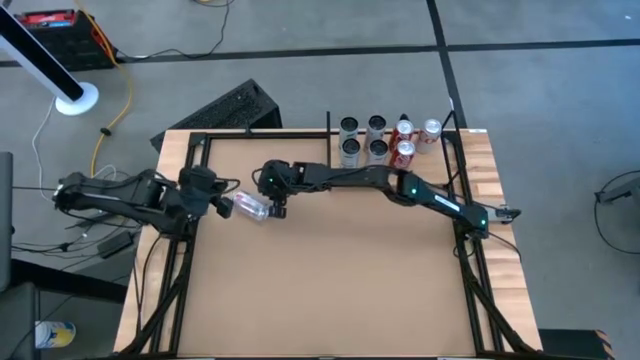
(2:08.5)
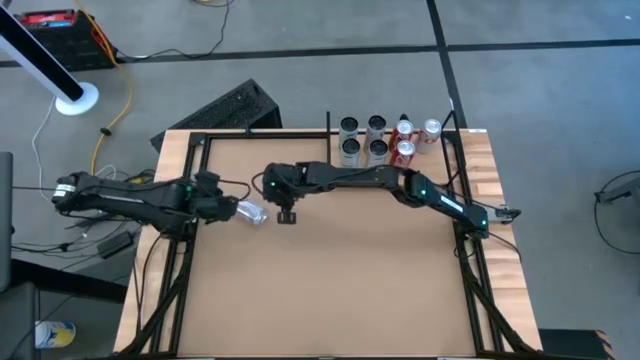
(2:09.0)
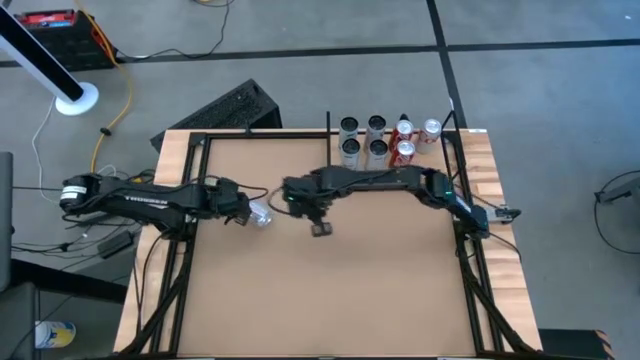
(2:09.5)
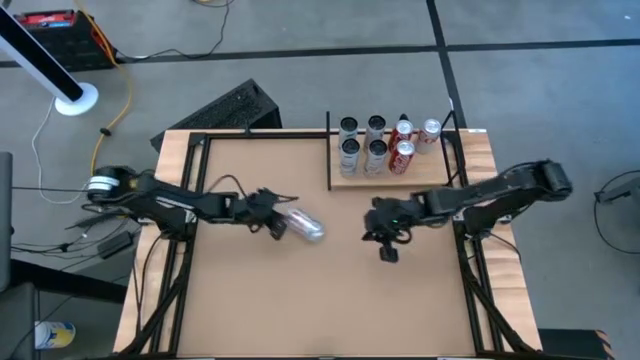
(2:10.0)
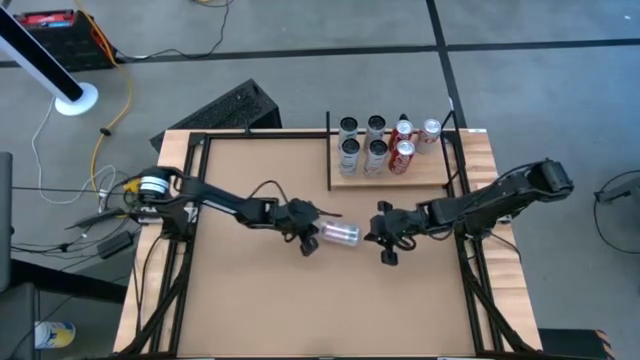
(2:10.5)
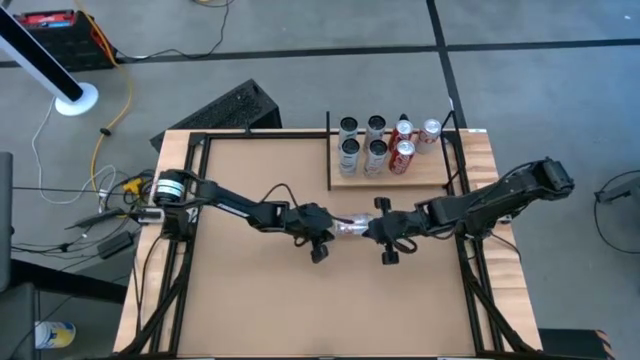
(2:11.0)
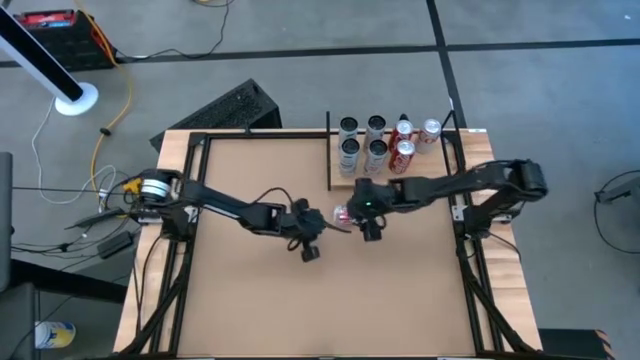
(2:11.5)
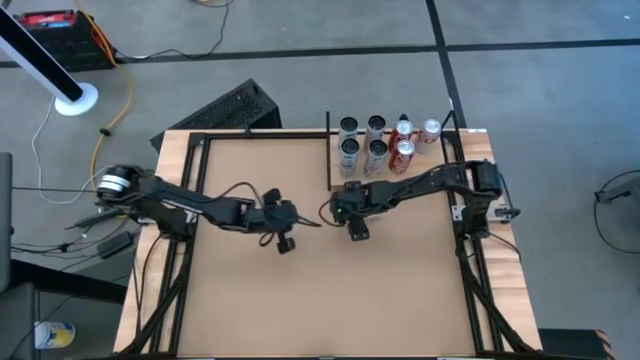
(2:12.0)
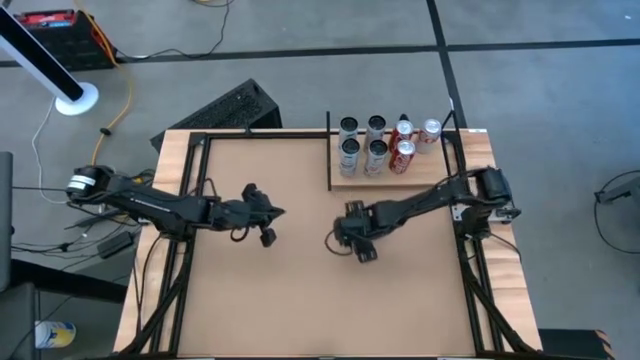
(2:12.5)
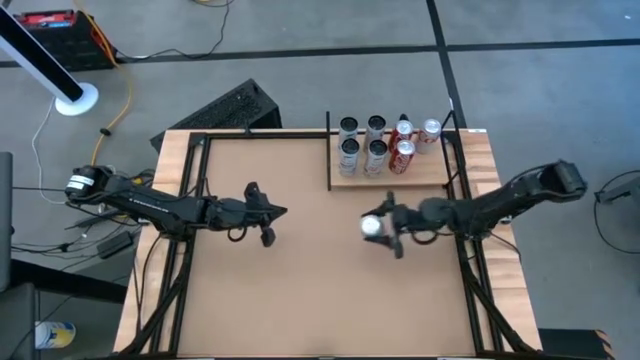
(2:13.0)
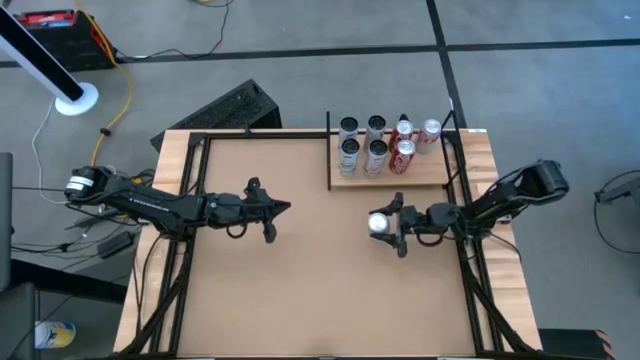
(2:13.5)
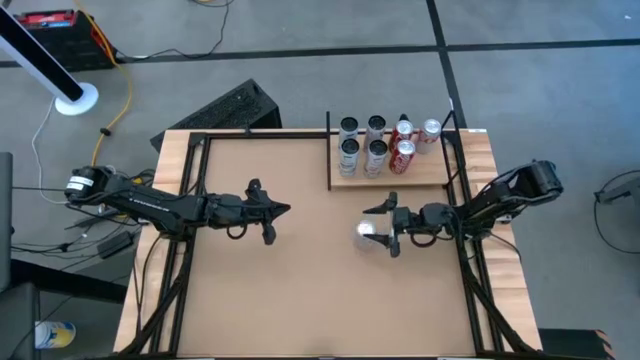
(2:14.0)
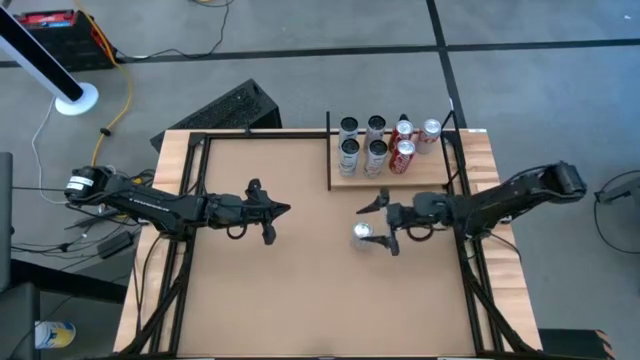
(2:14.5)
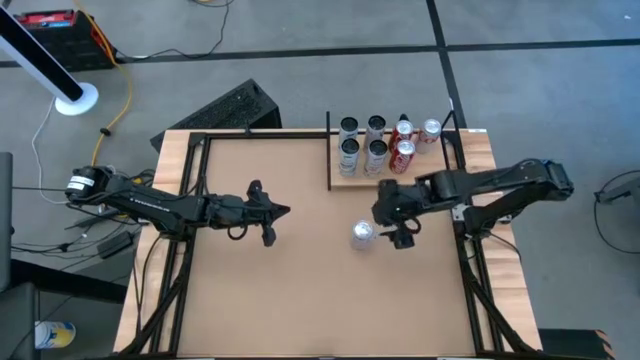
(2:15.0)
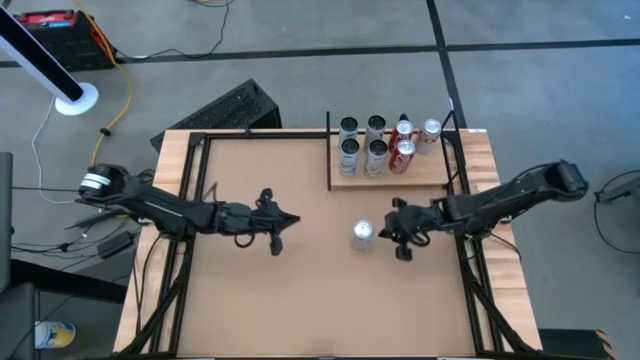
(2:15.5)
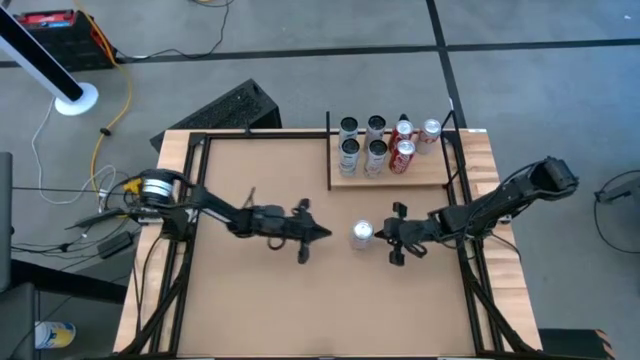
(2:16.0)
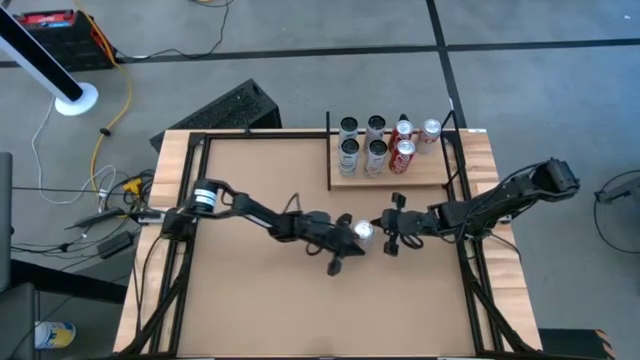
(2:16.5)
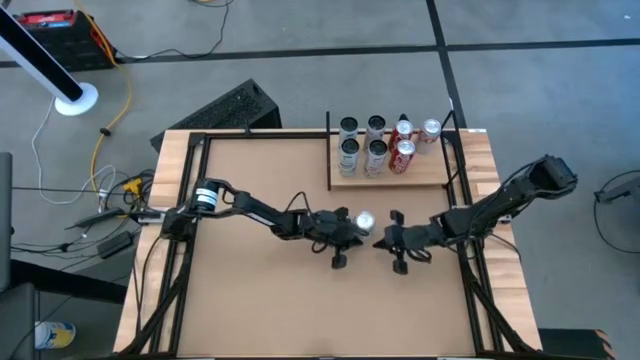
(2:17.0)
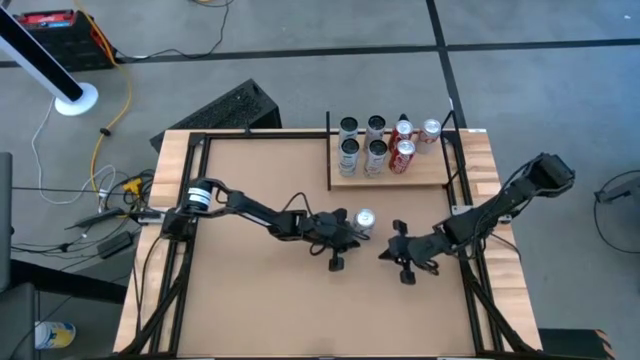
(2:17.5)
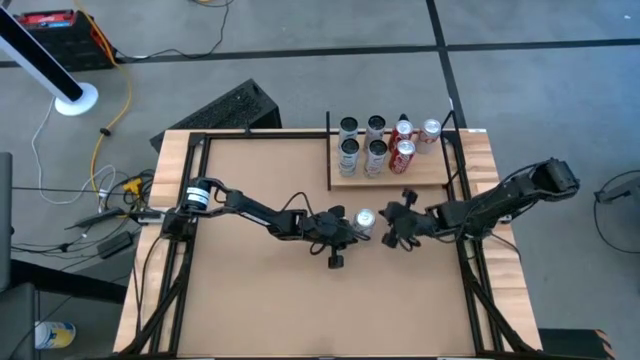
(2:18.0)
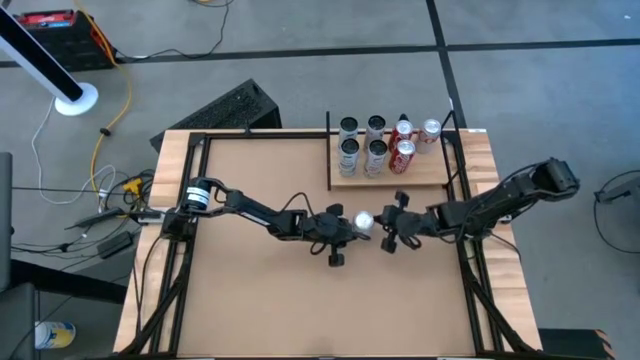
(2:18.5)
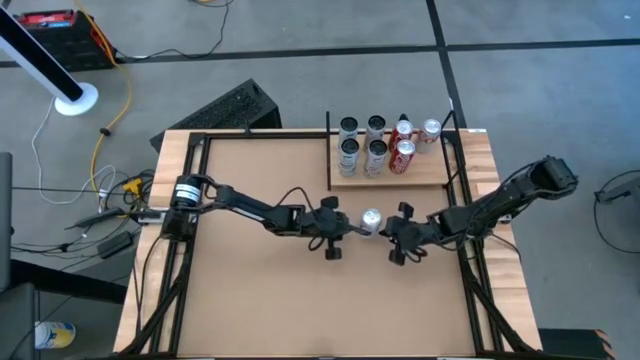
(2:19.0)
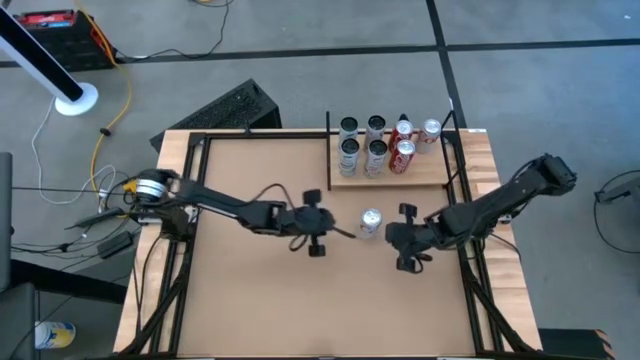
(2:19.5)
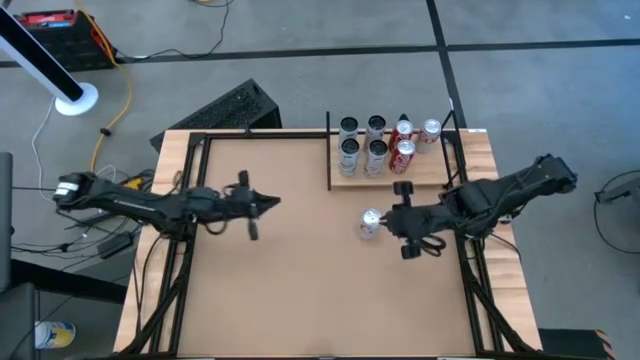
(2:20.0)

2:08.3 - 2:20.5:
Task: Place canned beverage on shelf
Put the silver and red soda can on the shelf

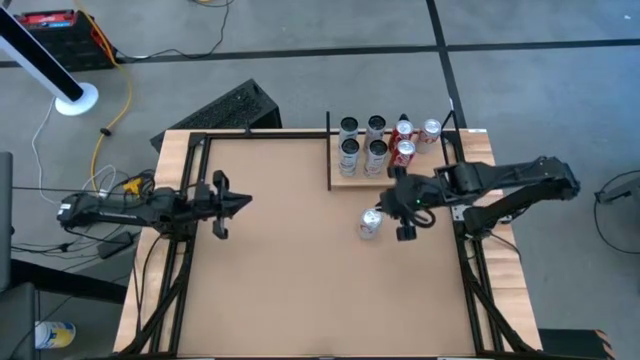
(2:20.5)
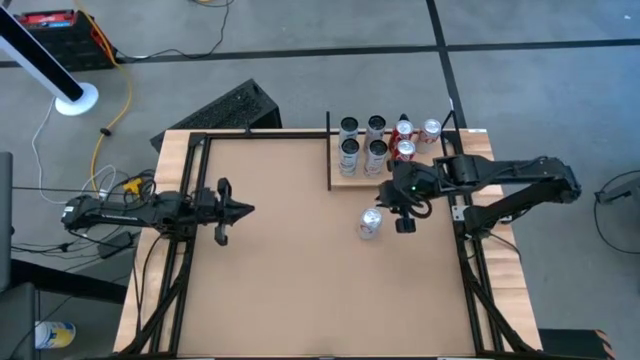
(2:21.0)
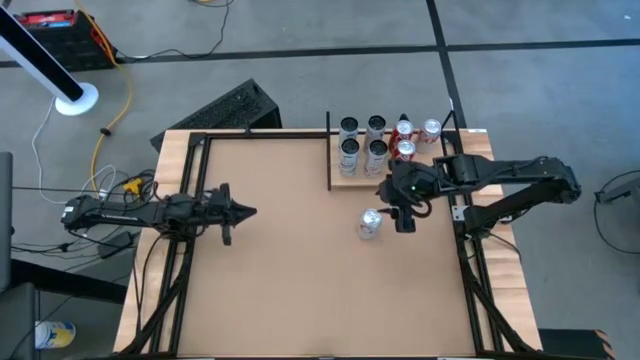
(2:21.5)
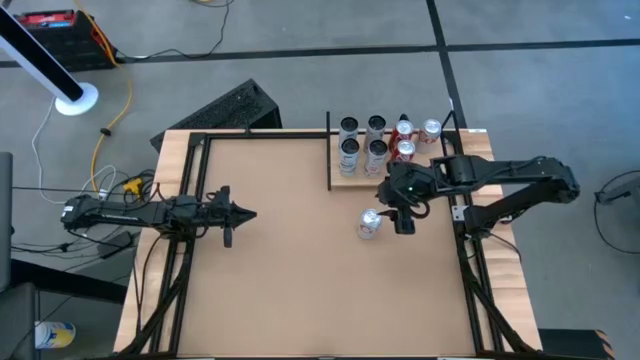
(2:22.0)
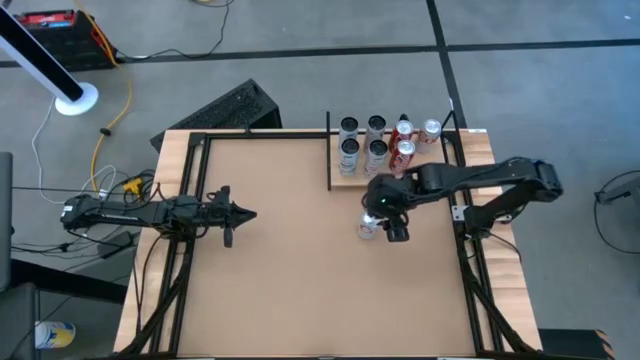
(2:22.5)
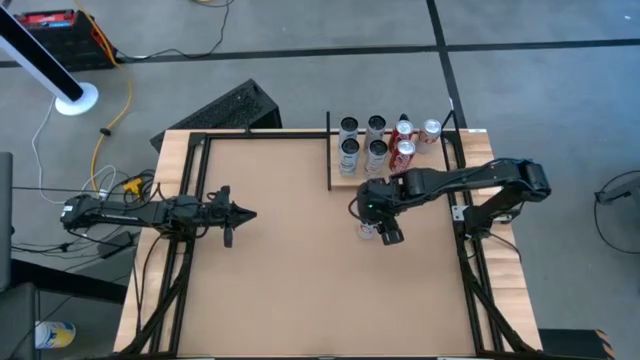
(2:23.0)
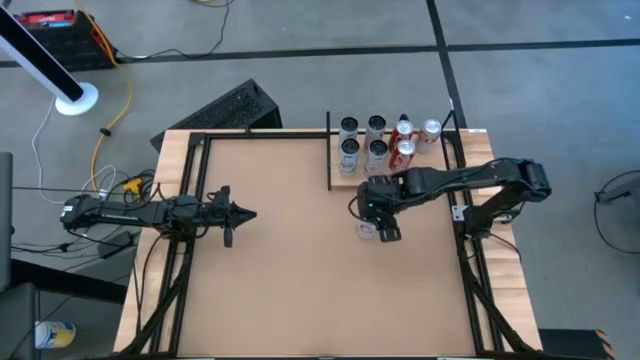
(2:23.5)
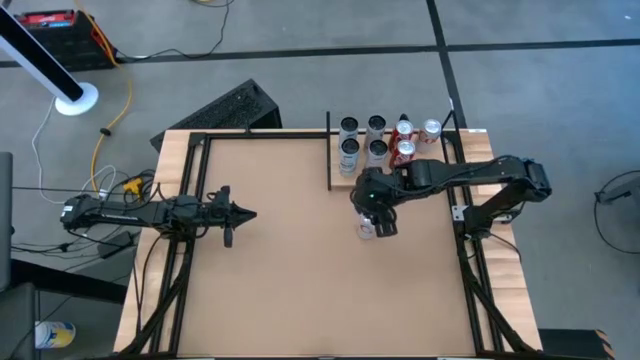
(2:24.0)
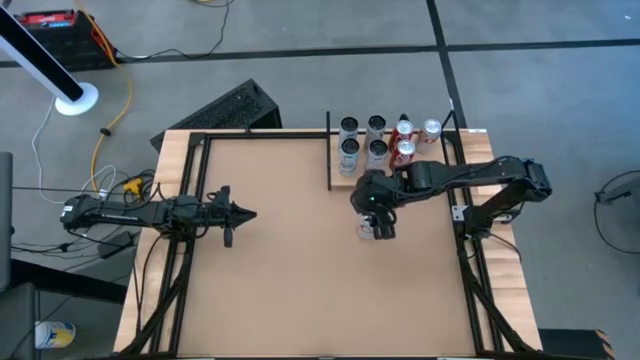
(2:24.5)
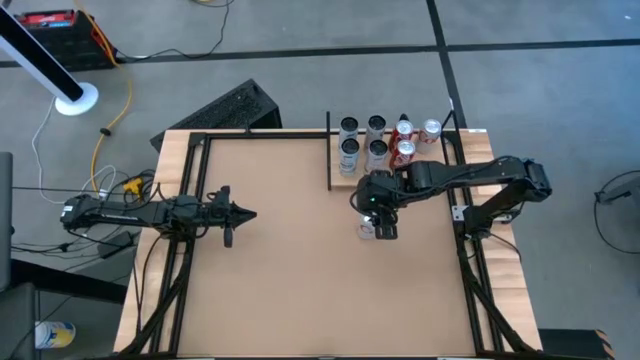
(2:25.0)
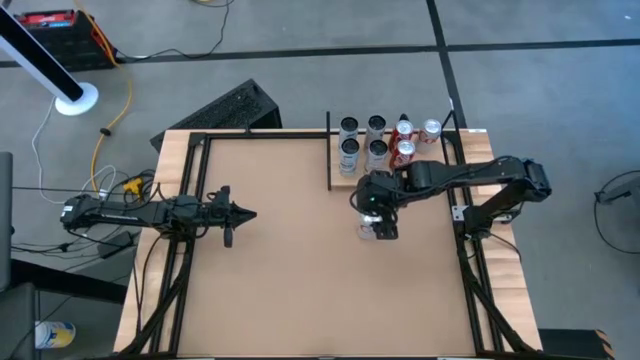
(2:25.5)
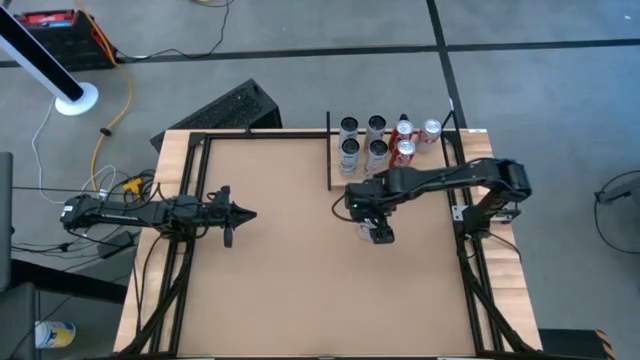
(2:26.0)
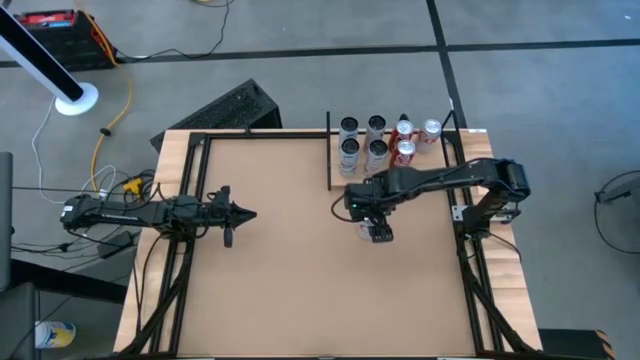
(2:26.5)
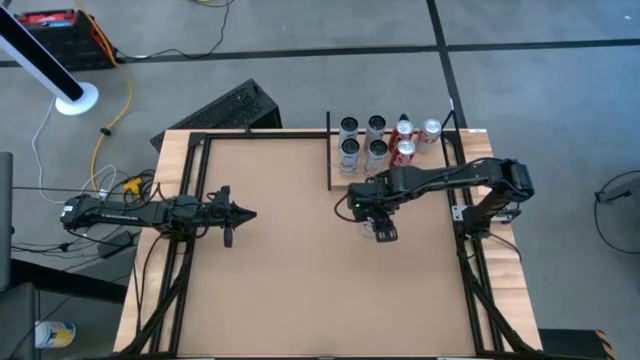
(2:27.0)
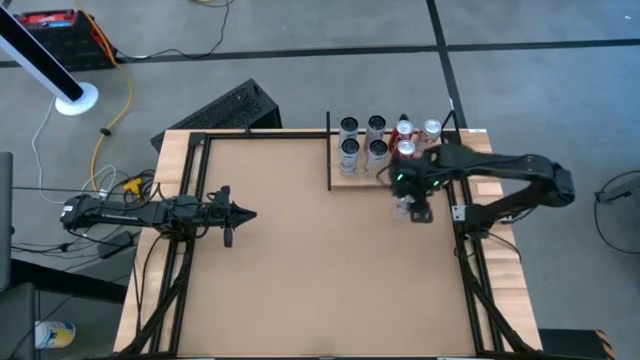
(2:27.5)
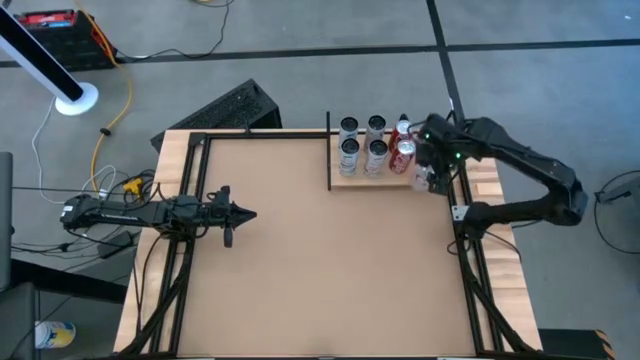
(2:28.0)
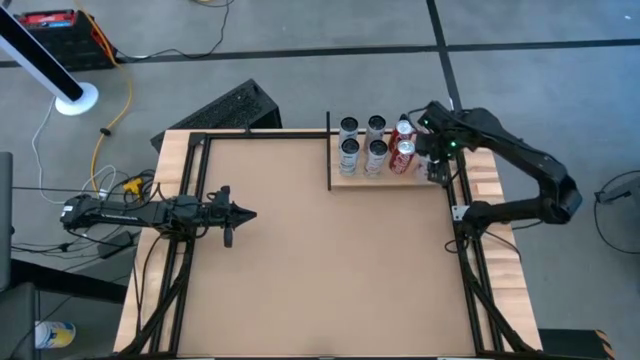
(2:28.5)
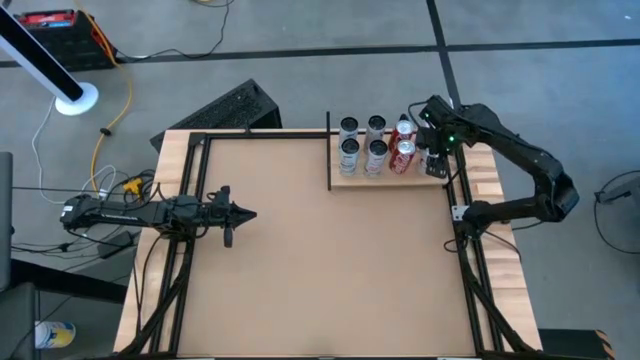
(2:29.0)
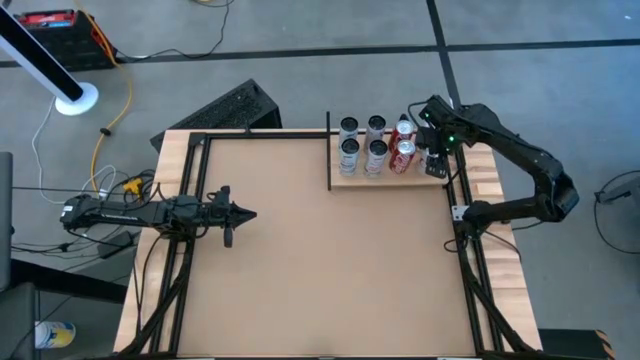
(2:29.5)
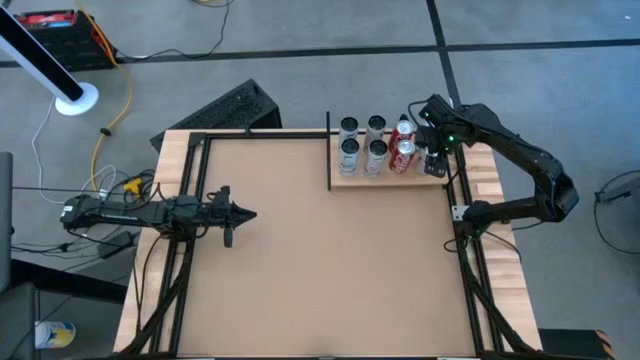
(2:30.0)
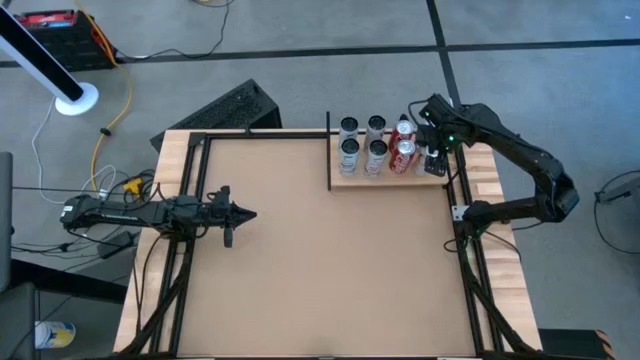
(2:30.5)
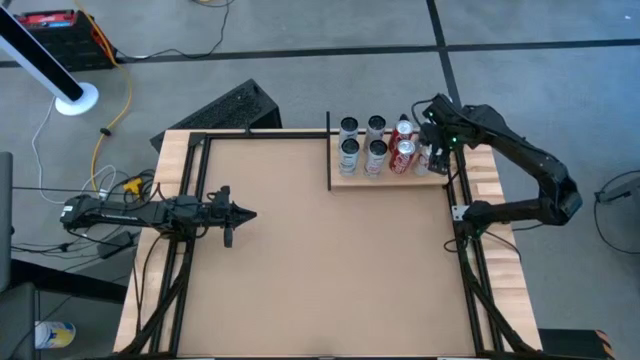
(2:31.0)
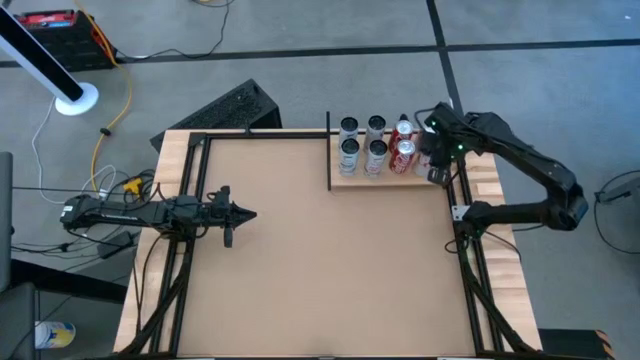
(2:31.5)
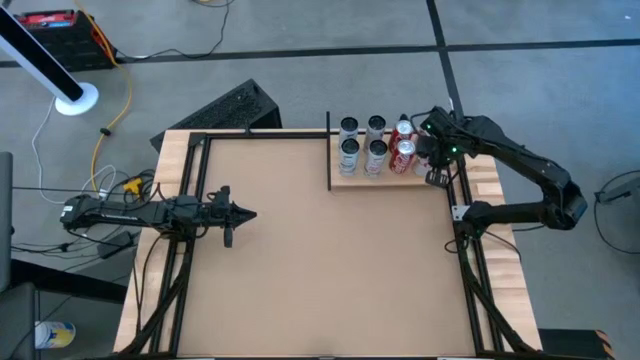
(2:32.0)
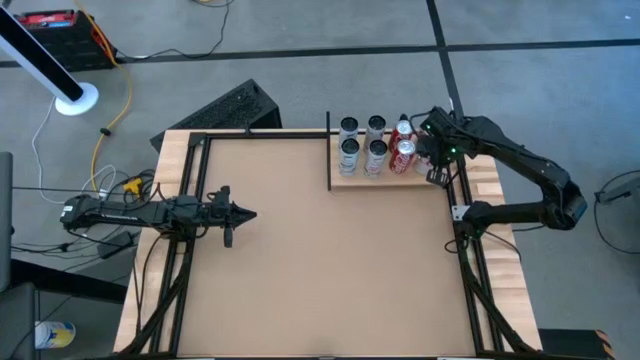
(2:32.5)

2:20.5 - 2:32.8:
Put the silver and red soda can on the shelf
